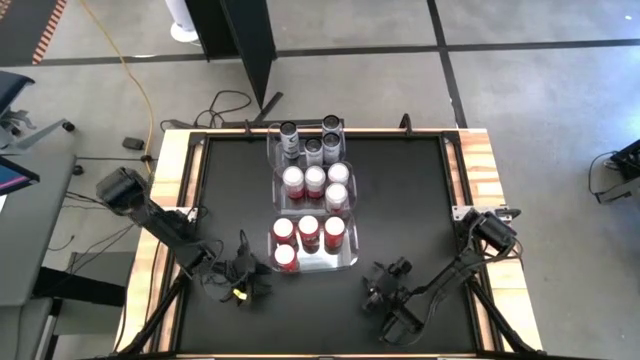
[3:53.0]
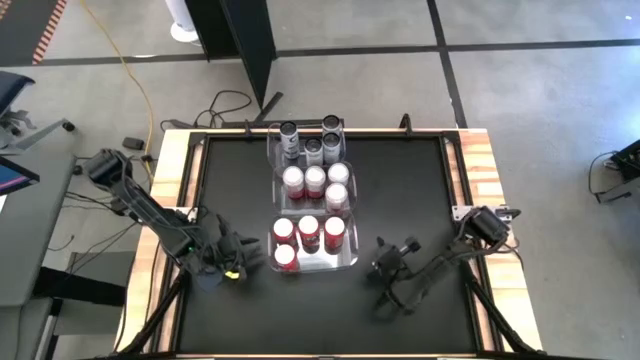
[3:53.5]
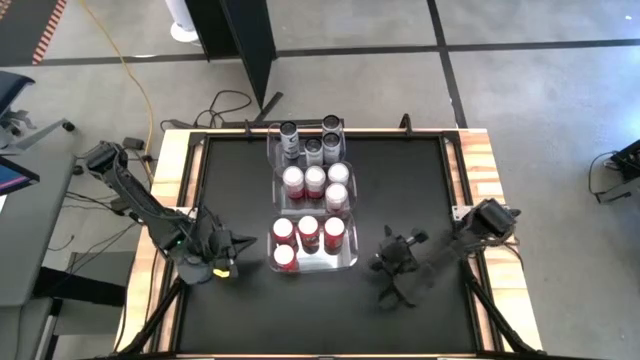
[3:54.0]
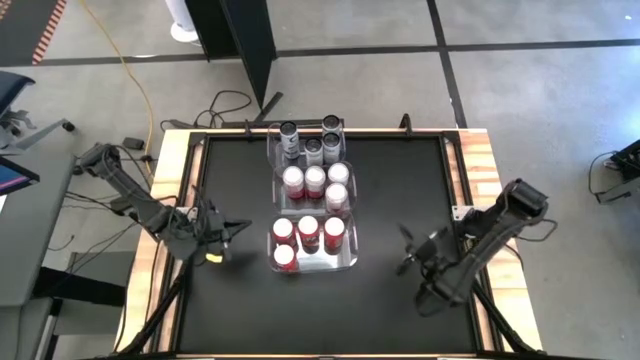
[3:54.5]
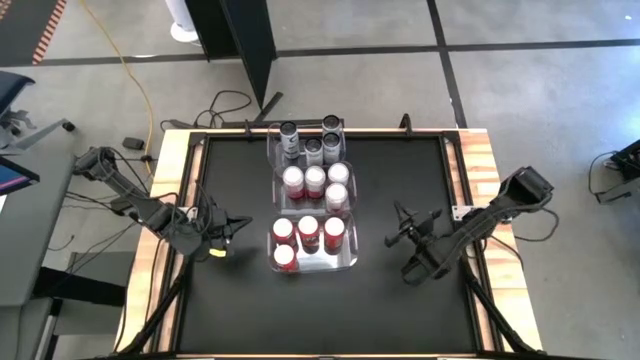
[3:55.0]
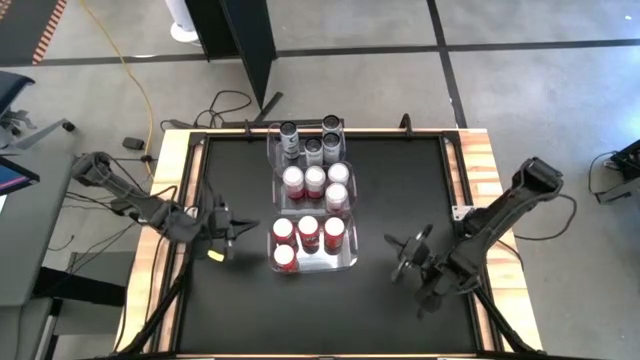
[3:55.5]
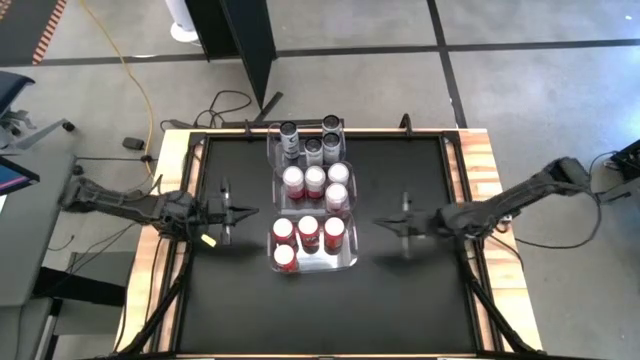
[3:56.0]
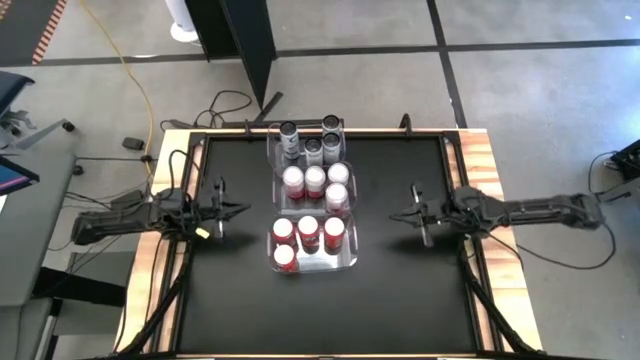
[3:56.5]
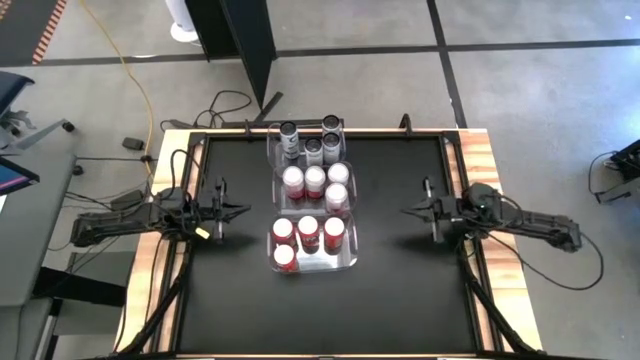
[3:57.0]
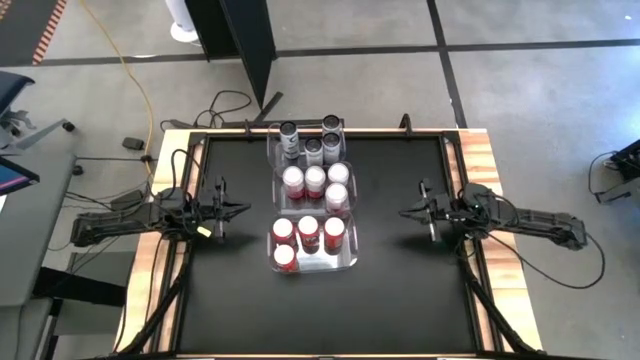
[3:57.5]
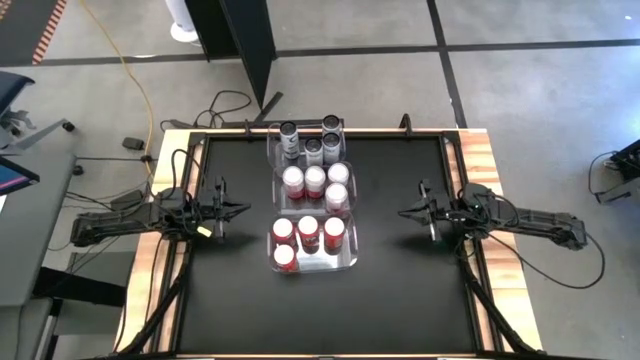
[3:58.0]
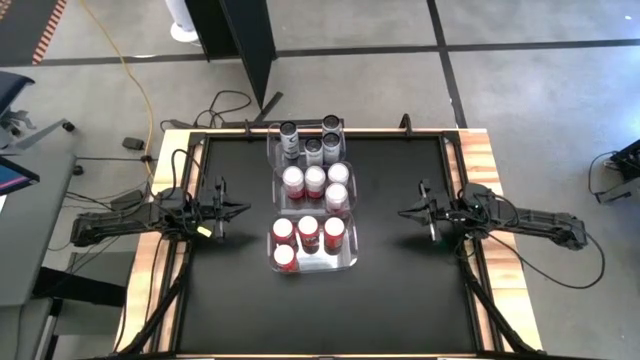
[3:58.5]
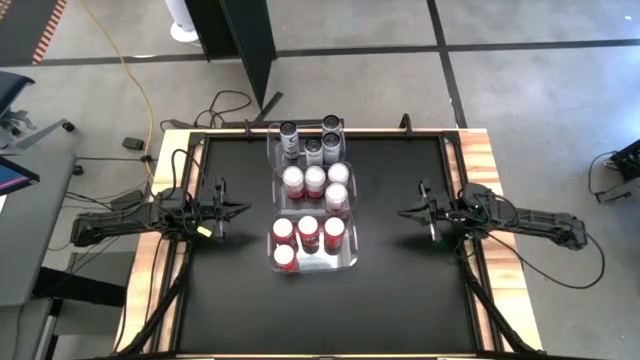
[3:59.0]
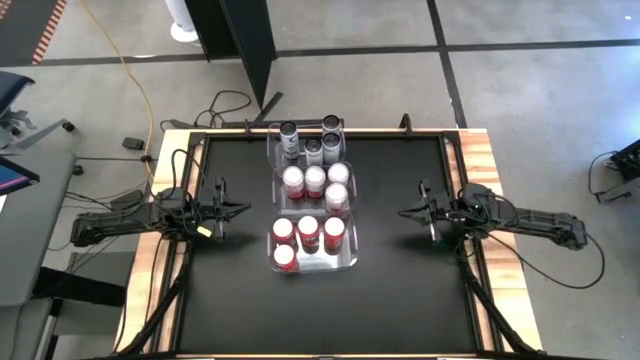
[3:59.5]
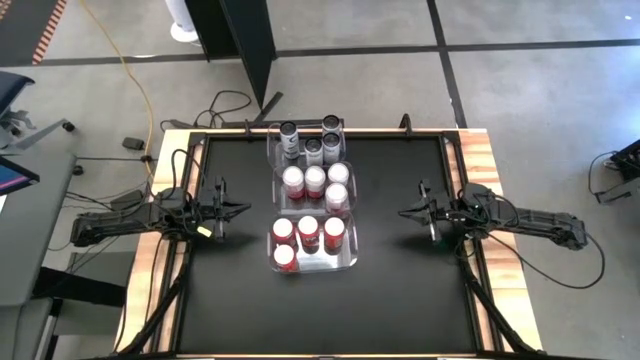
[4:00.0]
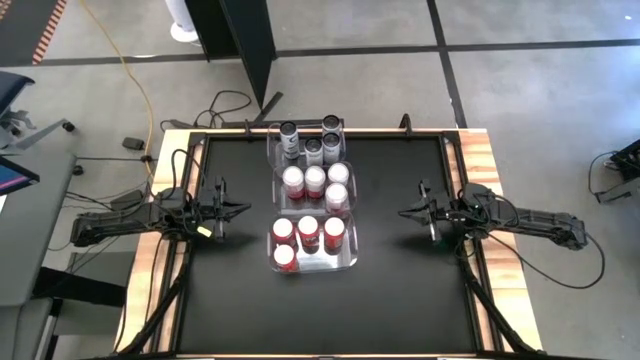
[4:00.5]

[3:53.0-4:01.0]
Task: Sort soda cans
Return to Home Position

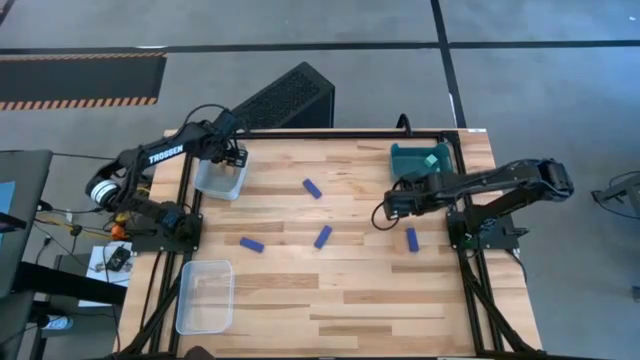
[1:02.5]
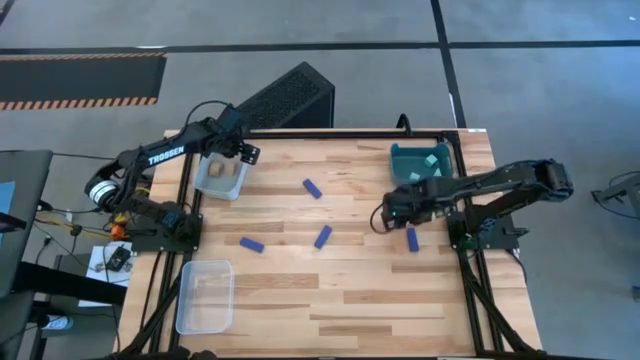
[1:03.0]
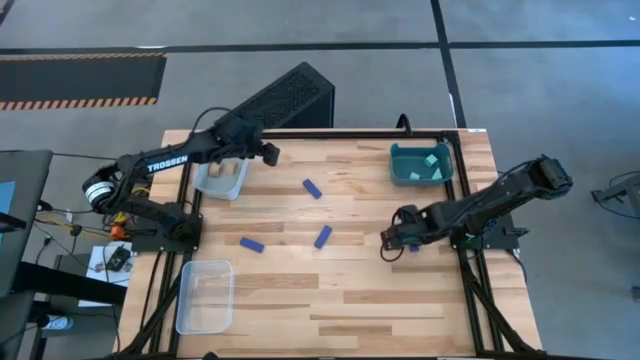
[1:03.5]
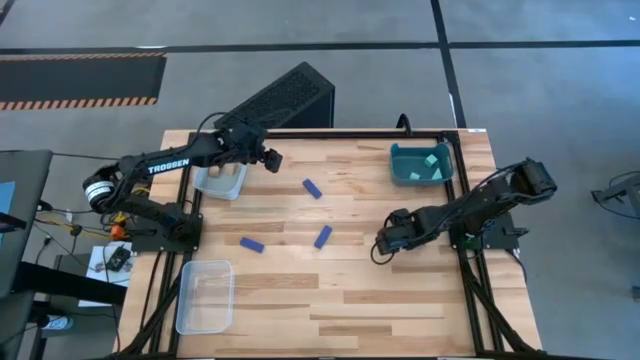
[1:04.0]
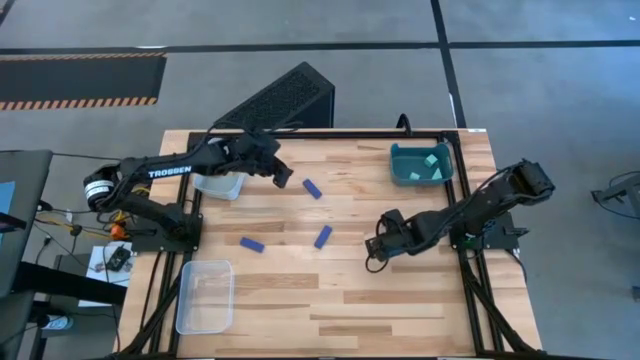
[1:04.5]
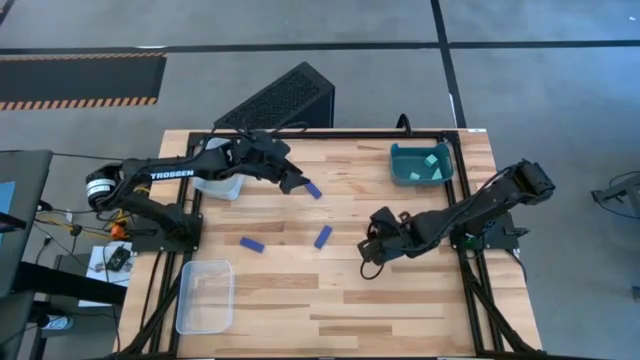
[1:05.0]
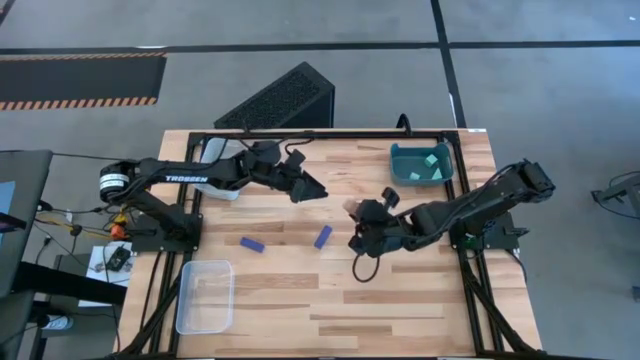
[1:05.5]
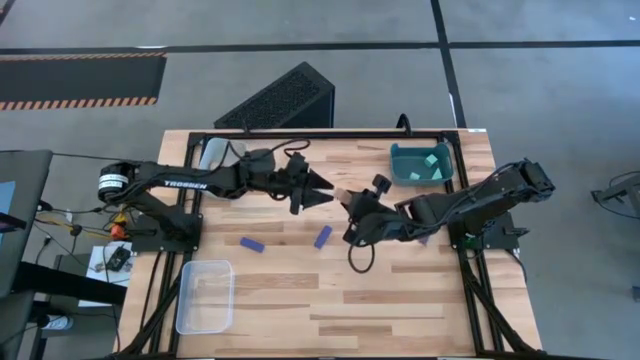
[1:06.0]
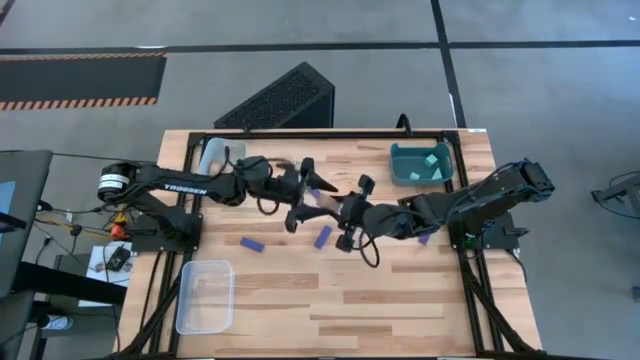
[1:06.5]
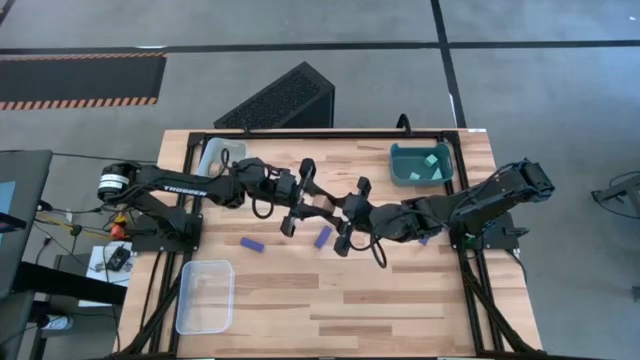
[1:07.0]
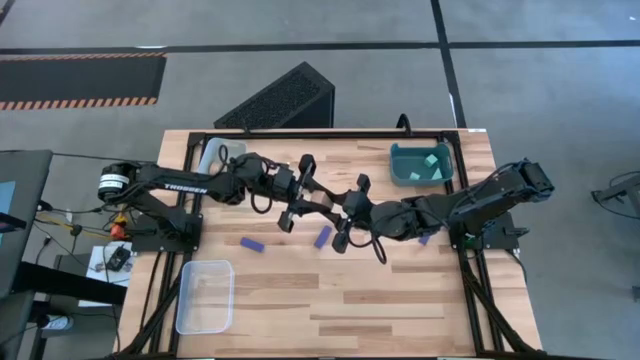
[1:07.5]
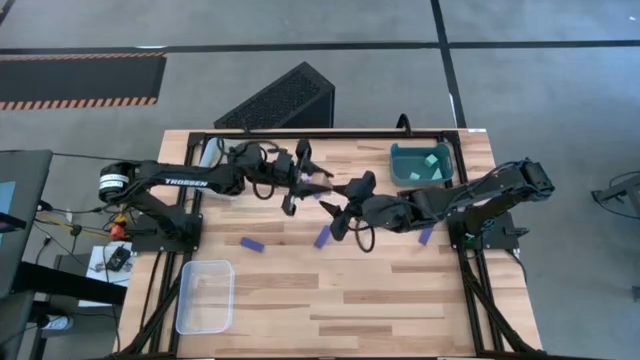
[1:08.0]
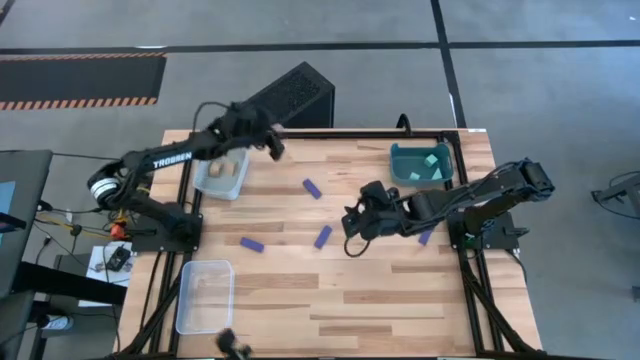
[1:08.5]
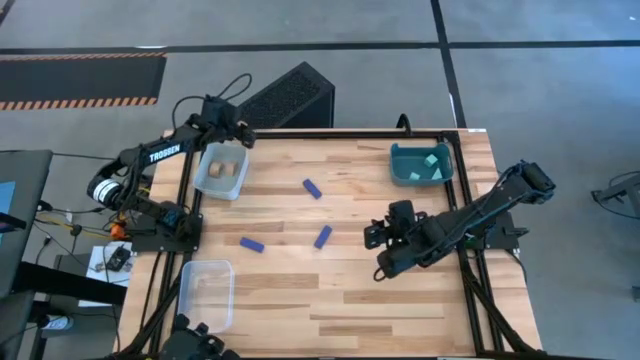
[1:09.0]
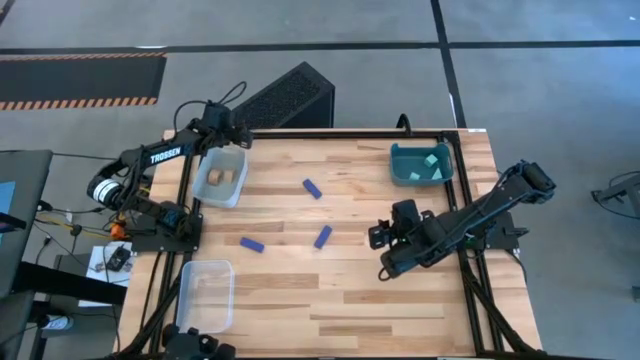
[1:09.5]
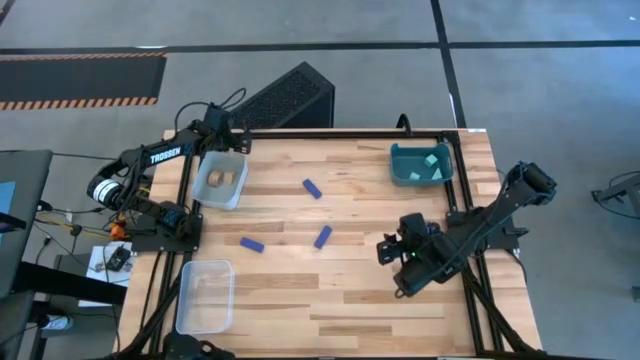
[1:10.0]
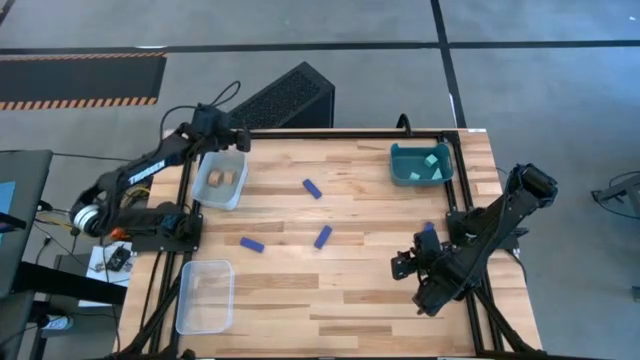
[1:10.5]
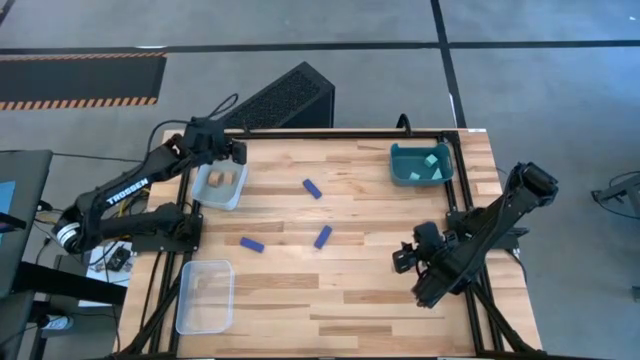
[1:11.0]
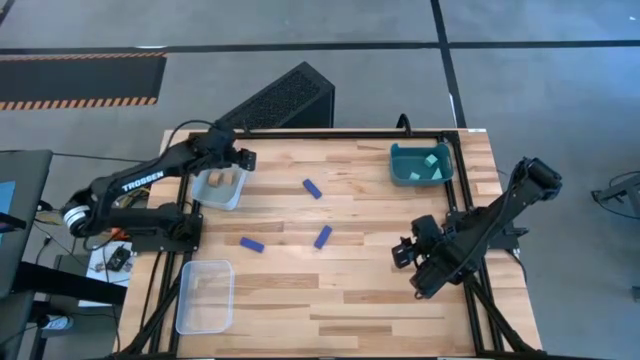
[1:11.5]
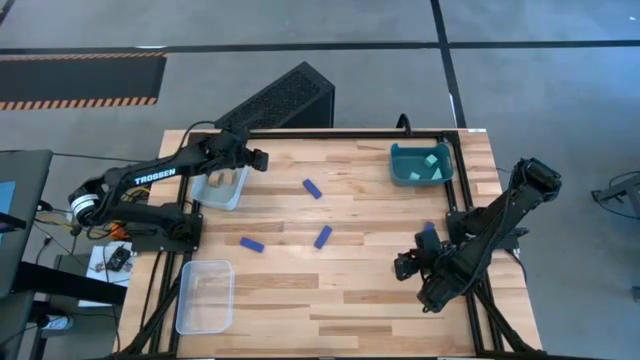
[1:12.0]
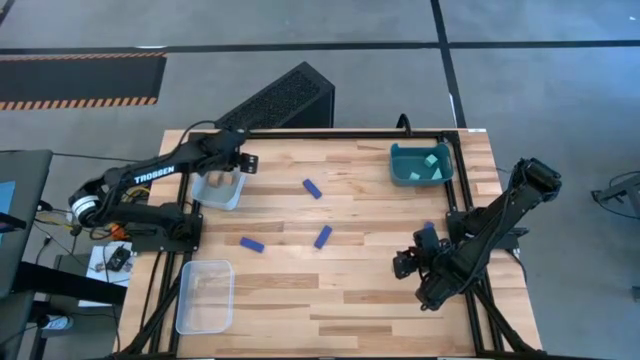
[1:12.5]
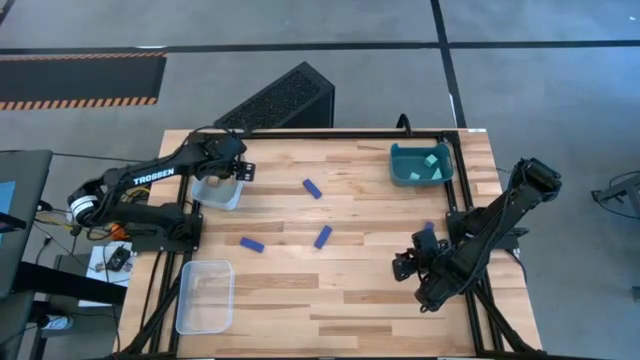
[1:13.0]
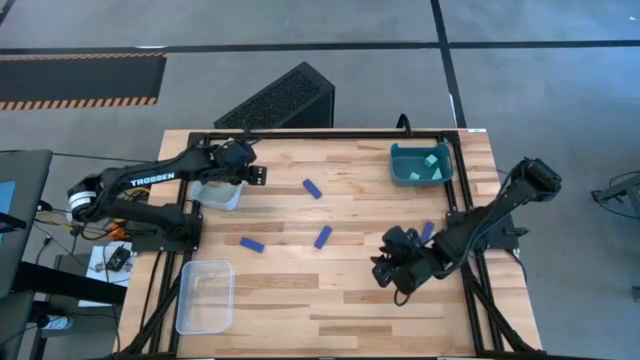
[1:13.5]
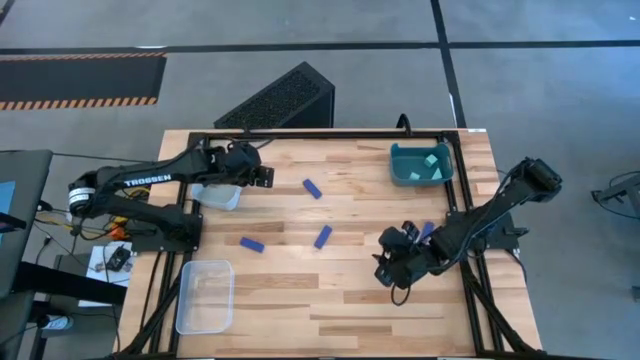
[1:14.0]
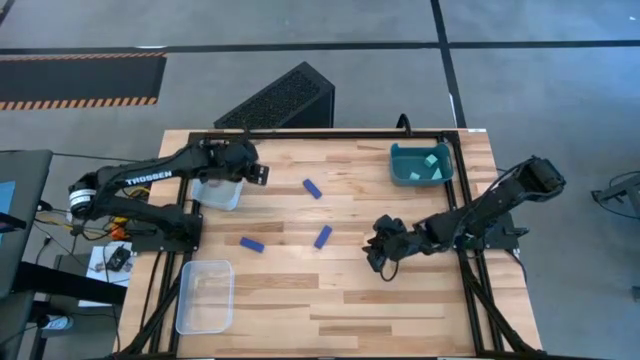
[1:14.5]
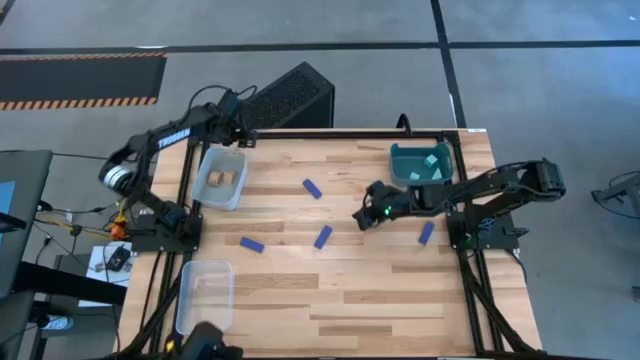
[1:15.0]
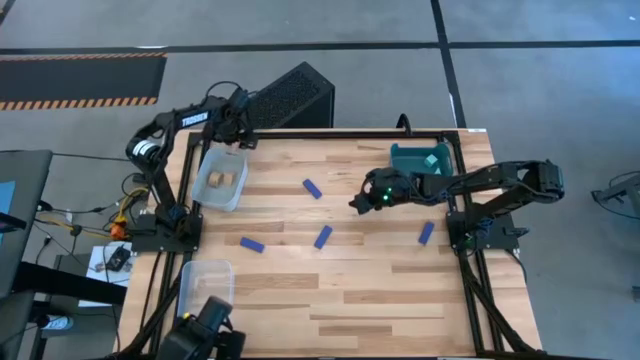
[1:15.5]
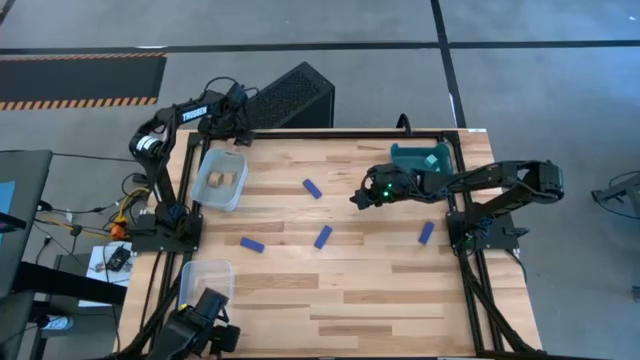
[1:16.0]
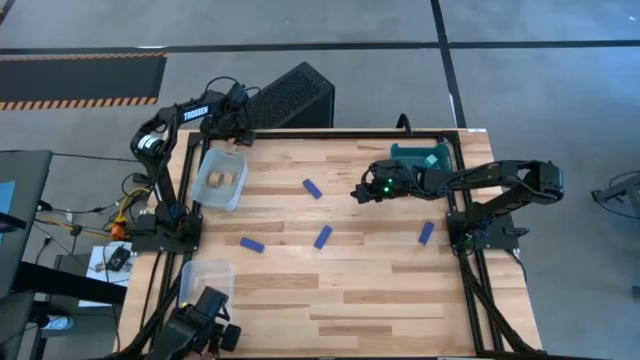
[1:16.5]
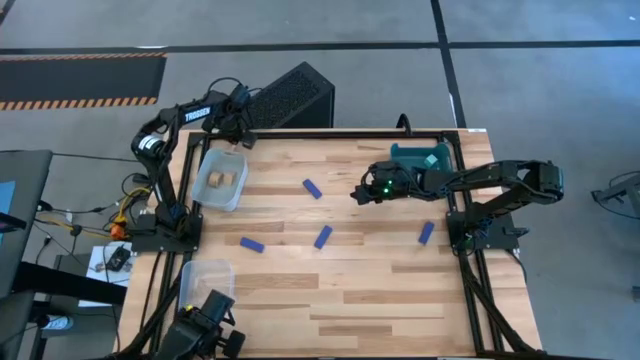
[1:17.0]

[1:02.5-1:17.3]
Task: Sort & place blocks by color
Put the light brown block into the white bin
